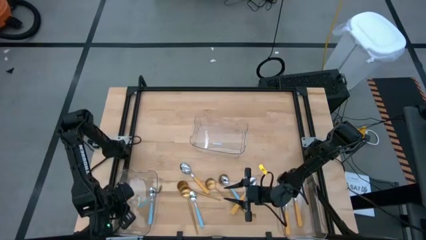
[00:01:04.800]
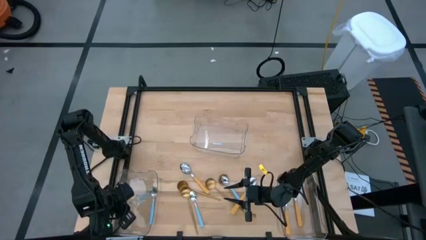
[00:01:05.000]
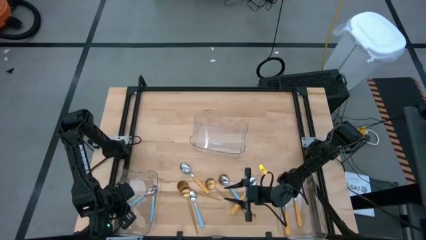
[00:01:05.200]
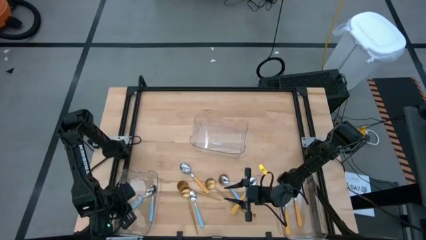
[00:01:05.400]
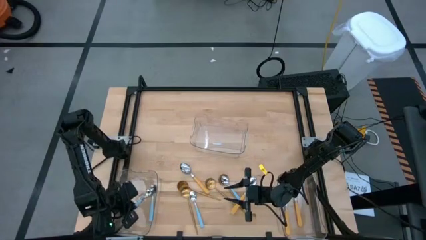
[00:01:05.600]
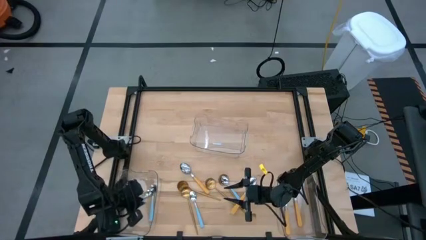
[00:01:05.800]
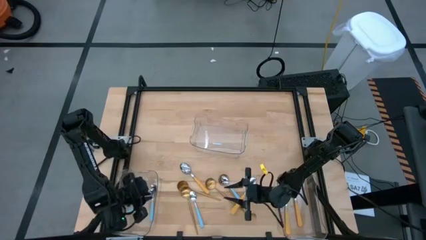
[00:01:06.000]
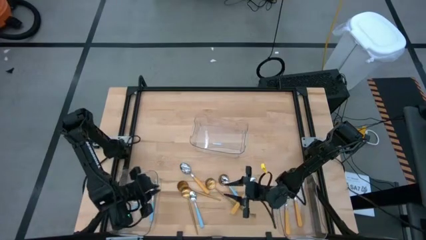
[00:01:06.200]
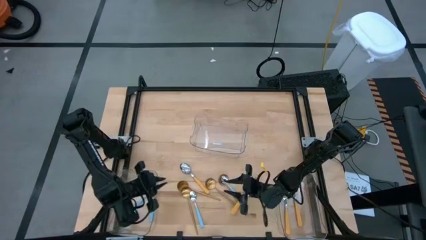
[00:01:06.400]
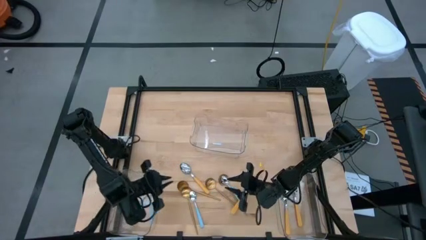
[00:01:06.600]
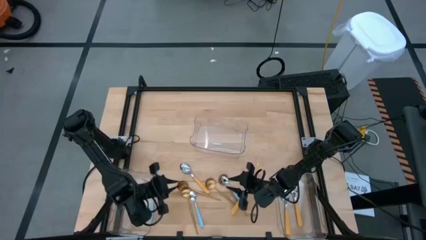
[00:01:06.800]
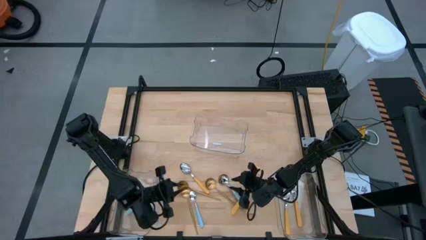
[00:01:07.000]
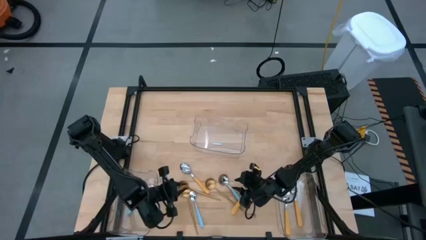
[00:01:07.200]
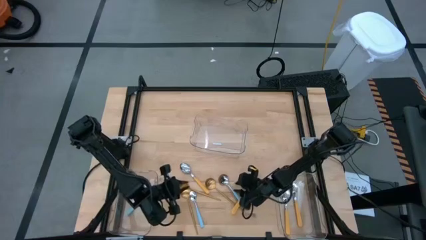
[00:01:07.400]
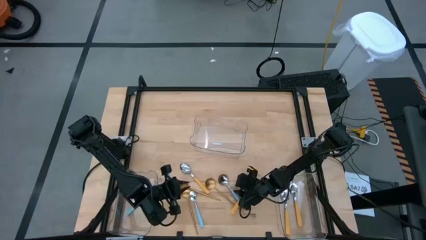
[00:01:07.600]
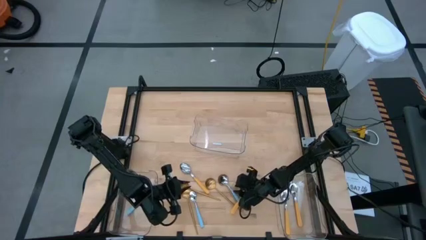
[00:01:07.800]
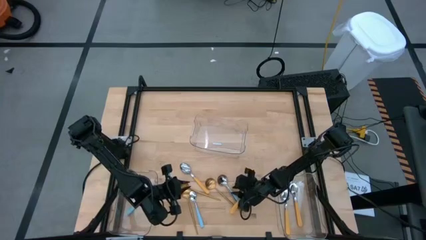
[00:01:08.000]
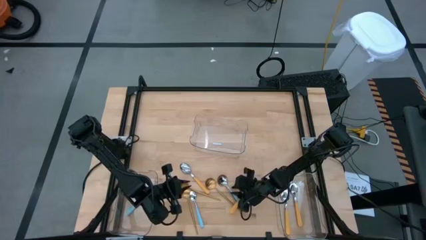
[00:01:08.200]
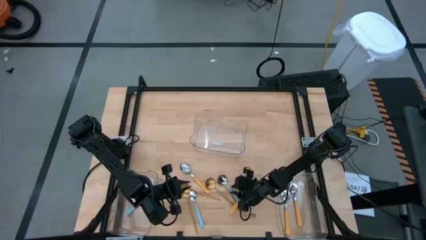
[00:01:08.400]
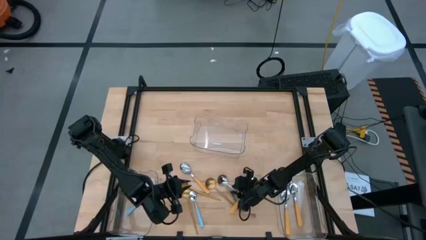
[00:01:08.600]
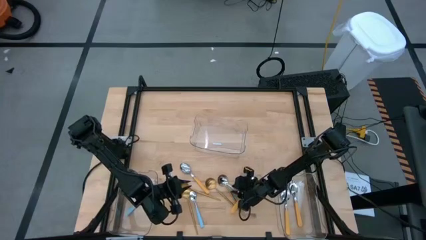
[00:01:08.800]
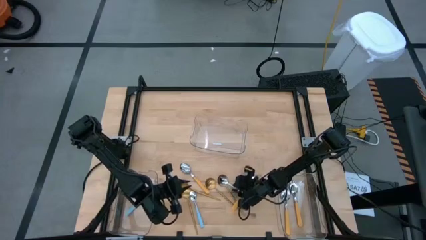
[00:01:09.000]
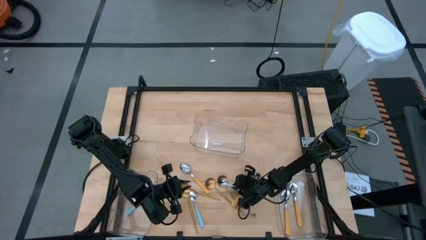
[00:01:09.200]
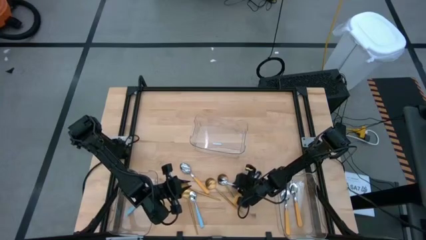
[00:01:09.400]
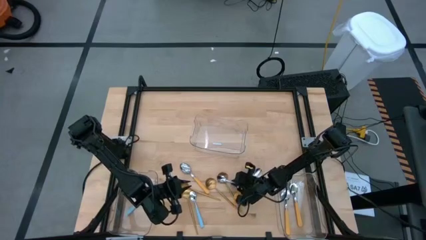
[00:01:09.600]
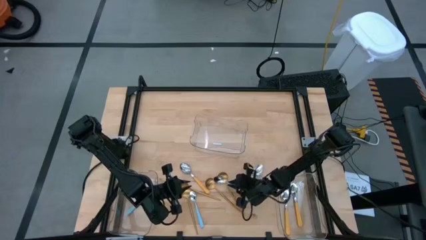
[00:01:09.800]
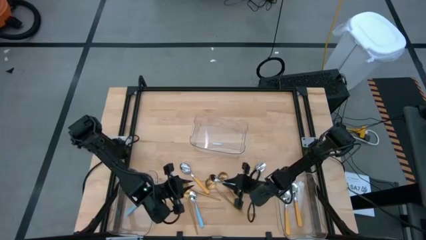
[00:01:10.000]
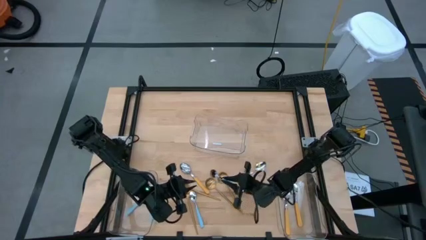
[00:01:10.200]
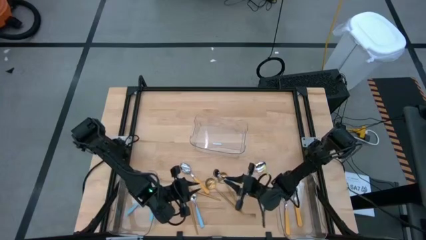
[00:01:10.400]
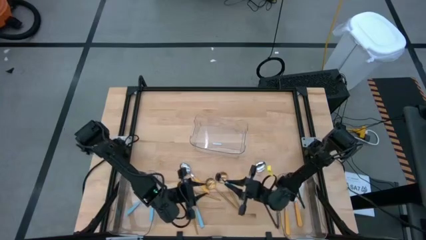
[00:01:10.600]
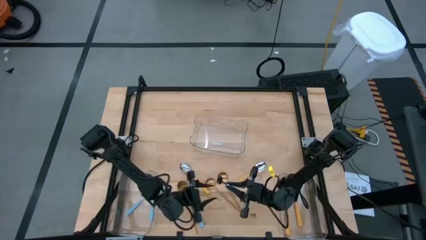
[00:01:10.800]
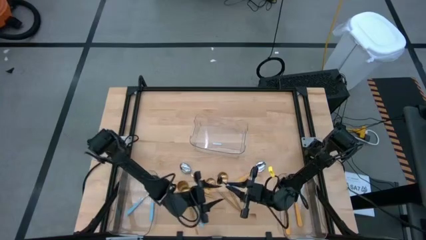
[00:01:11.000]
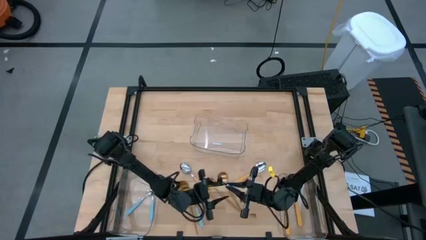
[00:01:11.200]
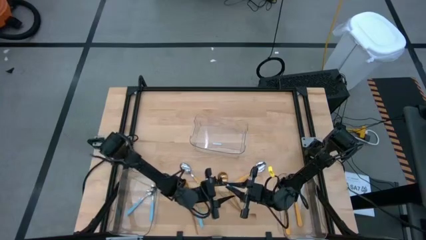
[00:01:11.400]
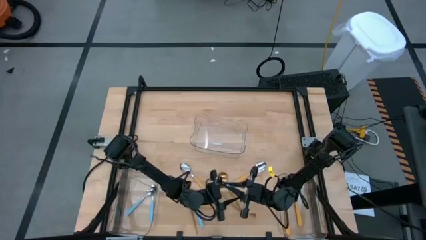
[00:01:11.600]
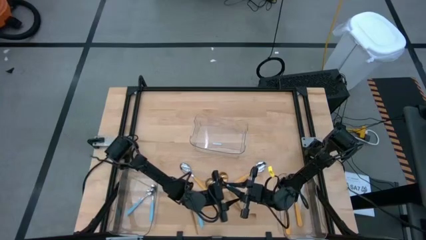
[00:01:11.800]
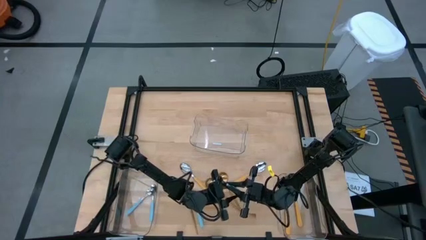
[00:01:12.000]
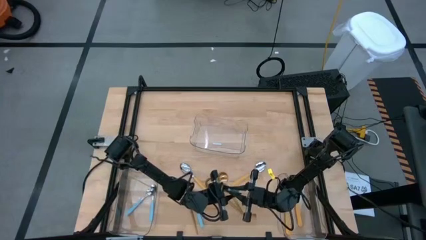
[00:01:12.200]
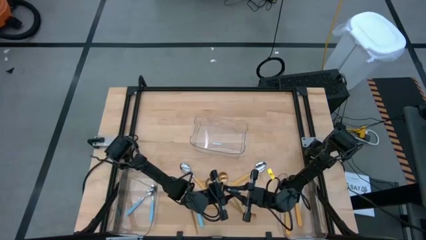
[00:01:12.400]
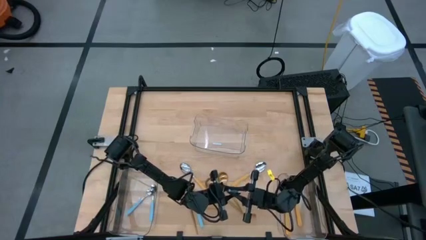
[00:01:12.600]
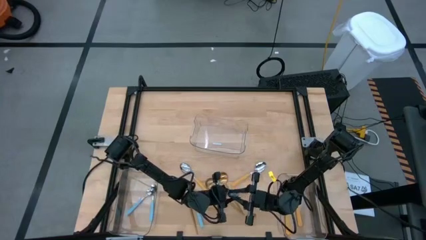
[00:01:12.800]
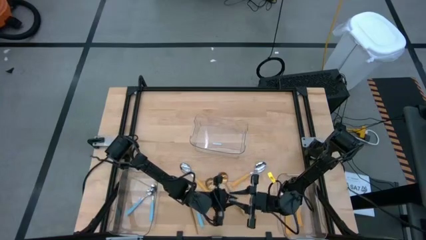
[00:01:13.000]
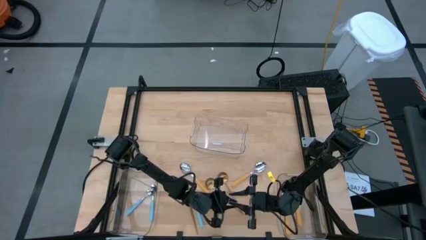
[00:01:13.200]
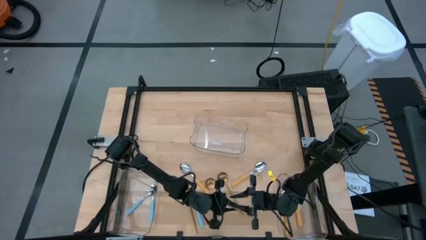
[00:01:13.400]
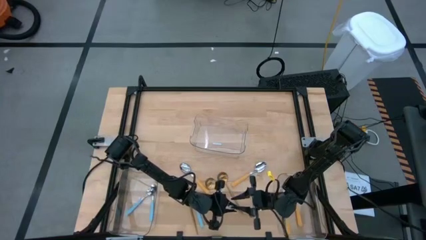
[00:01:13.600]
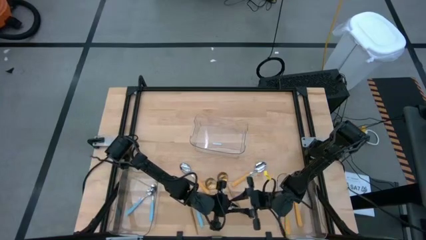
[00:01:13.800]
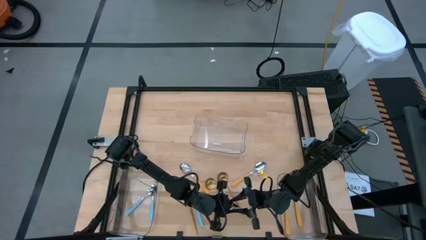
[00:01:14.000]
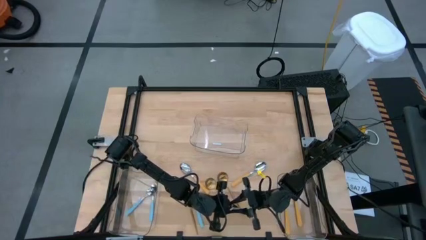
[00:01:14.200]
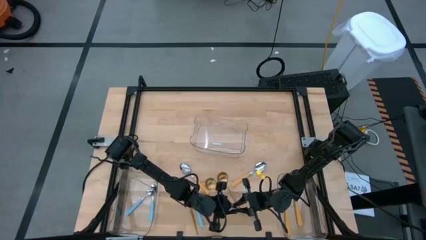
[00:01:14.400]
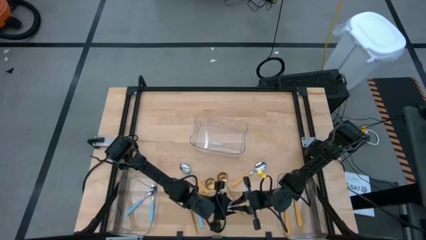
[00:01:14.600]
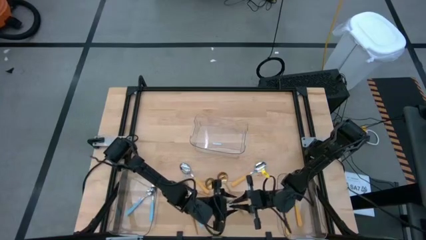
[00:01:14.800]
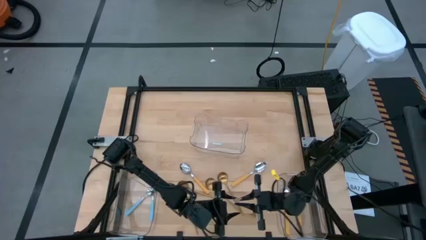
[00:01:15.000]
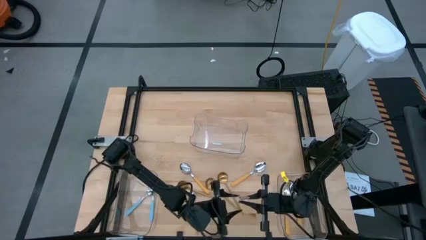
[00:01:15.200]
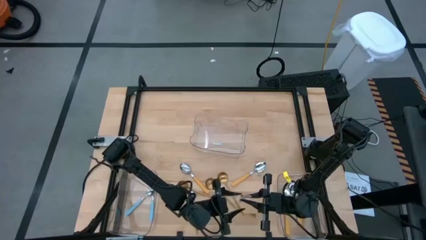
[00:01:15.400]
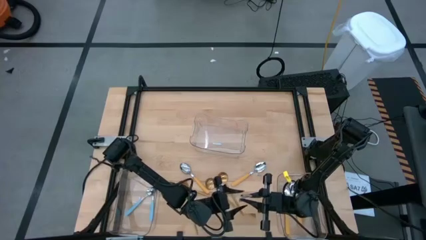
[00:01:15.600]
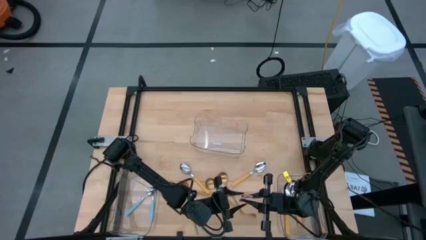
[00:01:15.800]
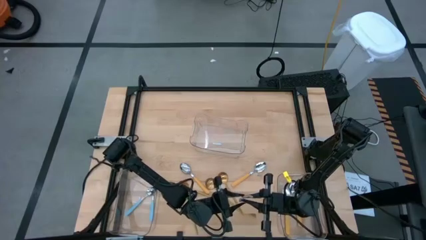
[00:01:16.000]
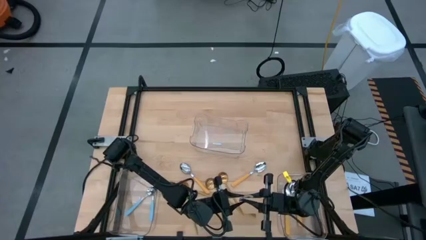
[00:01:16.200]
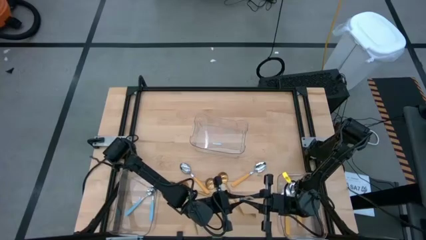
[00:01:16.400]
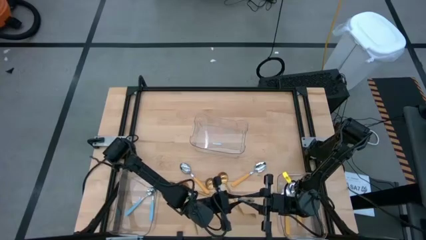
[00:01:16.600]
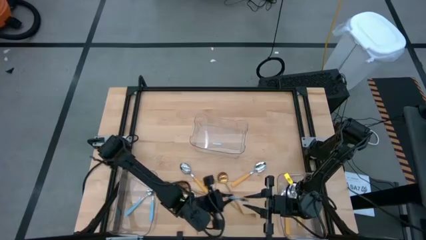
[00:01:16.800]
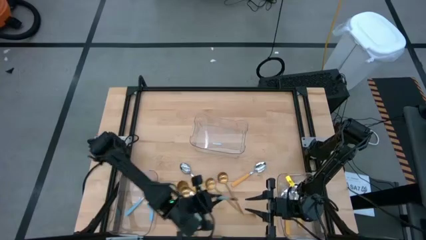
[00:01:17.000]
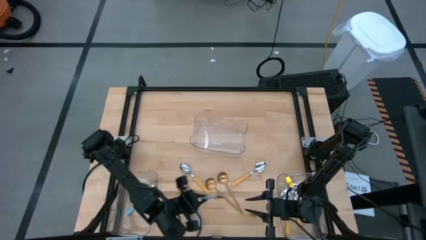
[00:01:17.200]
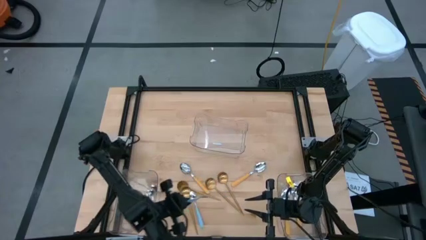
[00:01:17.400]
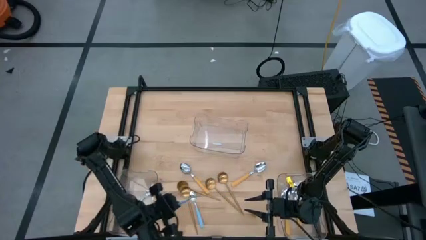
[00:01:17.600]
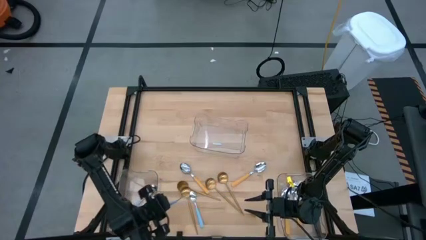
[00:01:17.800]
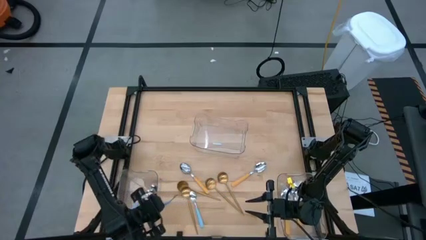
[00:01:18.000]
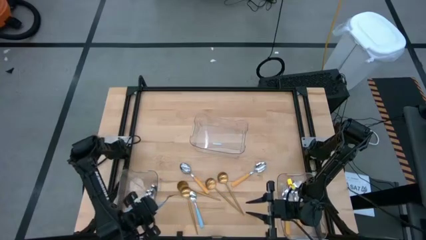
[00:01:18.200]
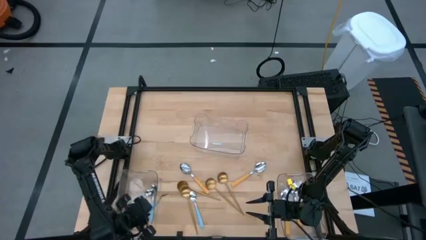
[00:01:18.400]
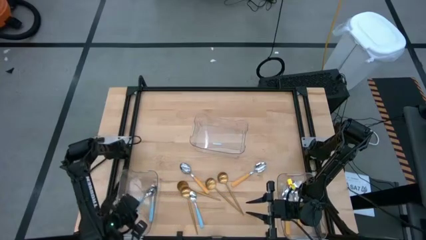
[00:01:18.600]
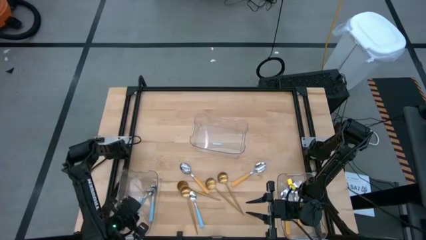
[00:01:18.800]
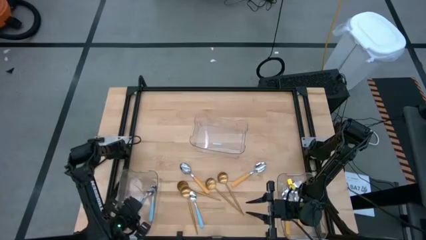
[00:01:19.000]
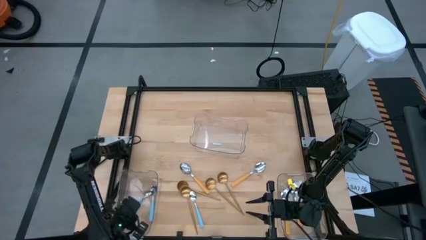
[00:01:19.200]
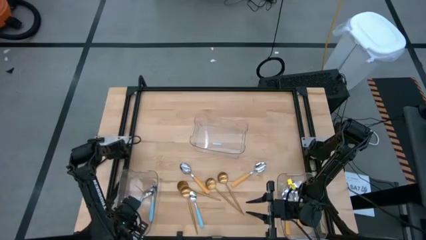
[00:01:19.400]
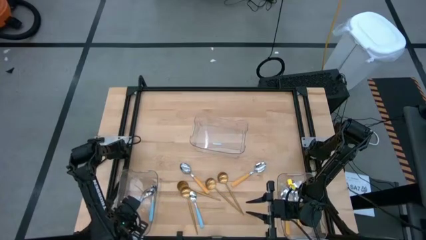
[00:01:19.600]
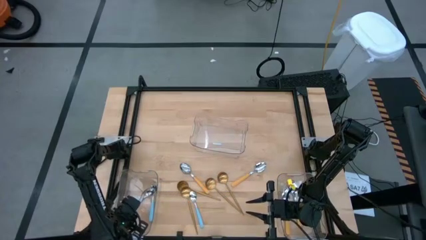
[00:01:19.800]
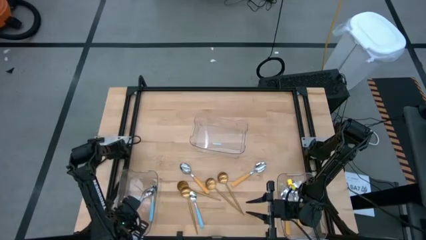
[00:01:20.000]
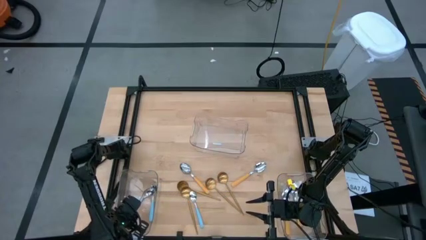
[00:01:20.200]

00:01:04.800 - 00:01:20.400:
Task: Sort silverware by color (type)
Put the blue spoon into the bottom left transparent bin
